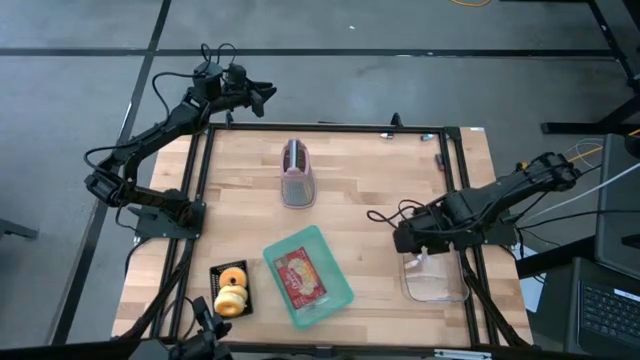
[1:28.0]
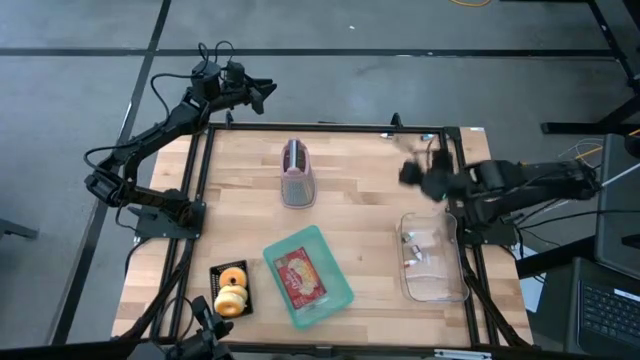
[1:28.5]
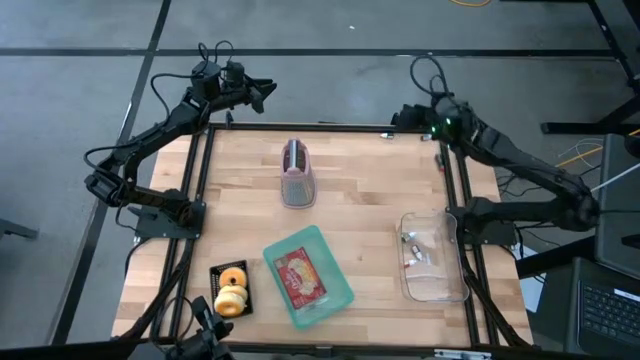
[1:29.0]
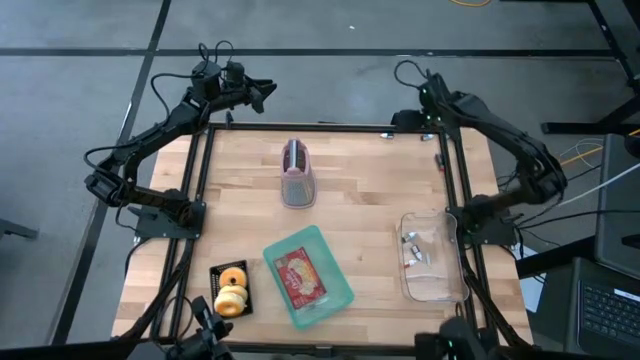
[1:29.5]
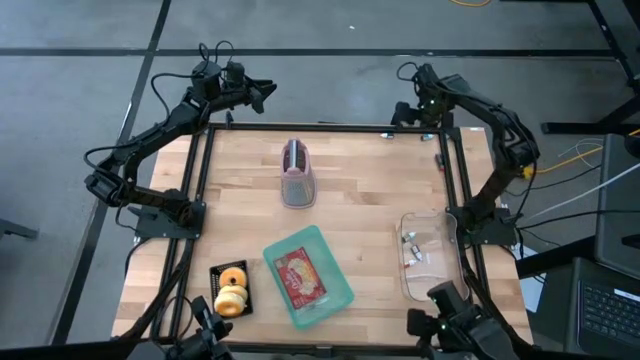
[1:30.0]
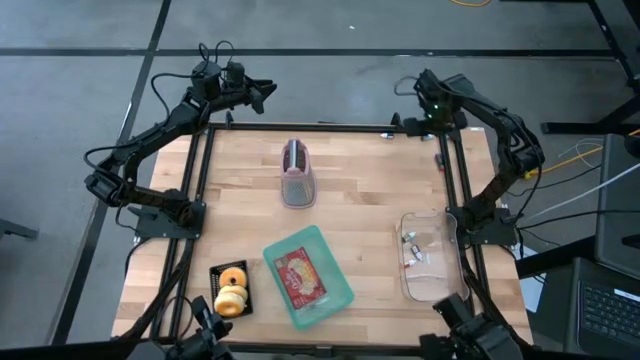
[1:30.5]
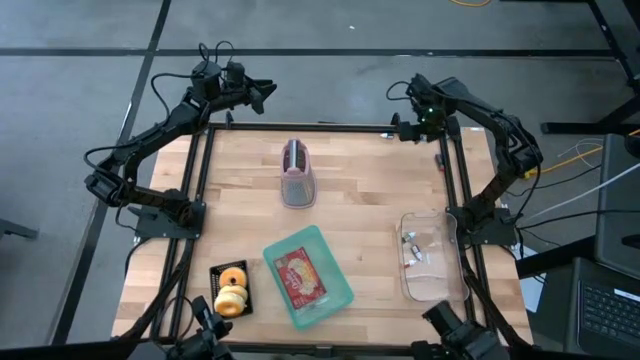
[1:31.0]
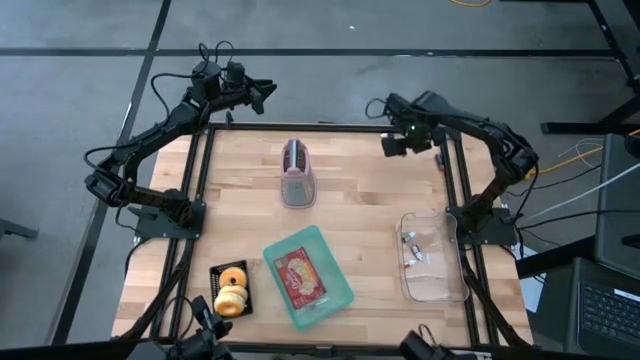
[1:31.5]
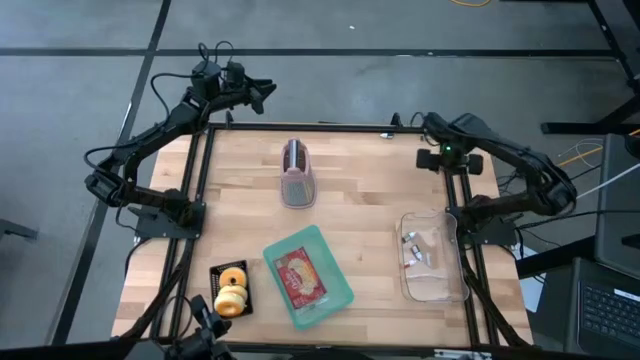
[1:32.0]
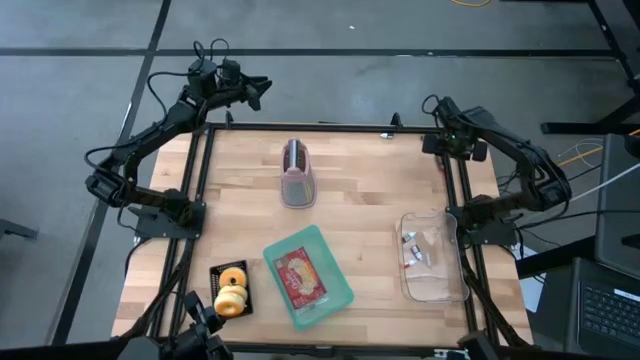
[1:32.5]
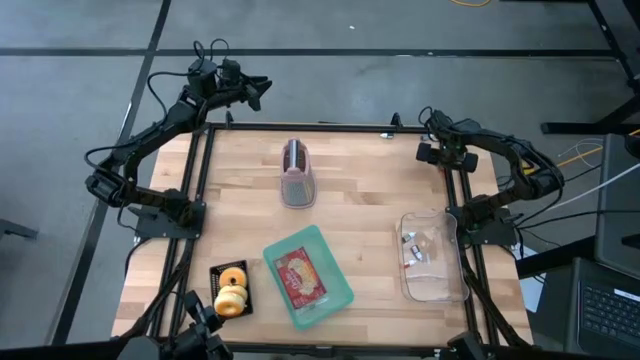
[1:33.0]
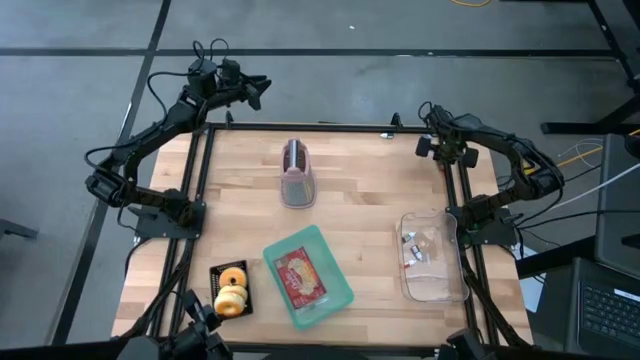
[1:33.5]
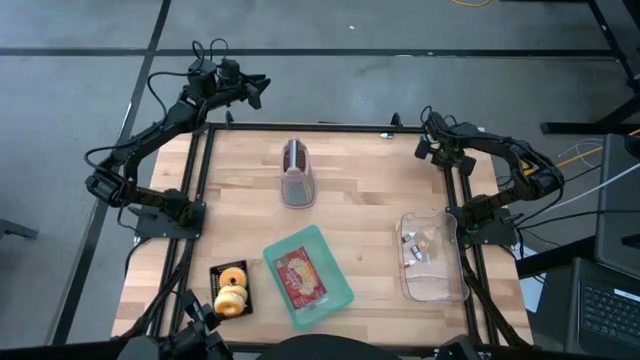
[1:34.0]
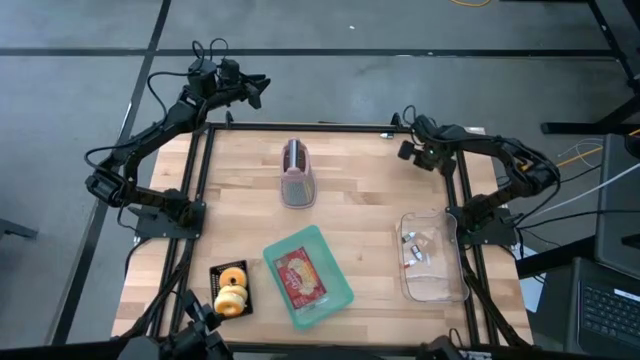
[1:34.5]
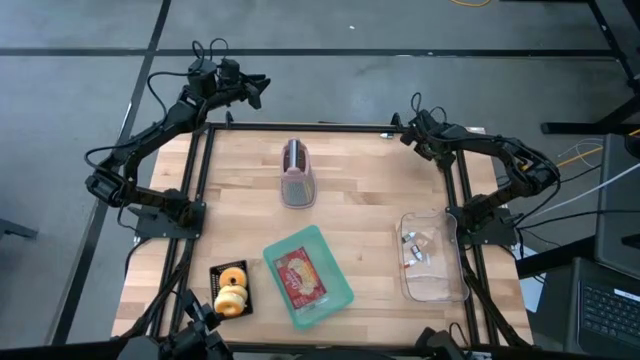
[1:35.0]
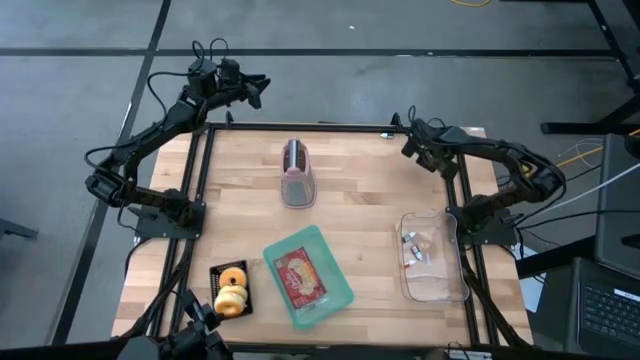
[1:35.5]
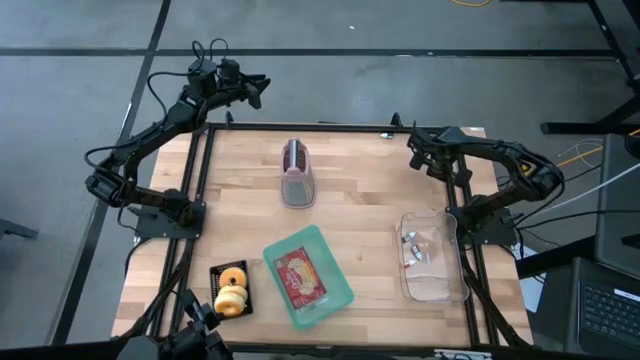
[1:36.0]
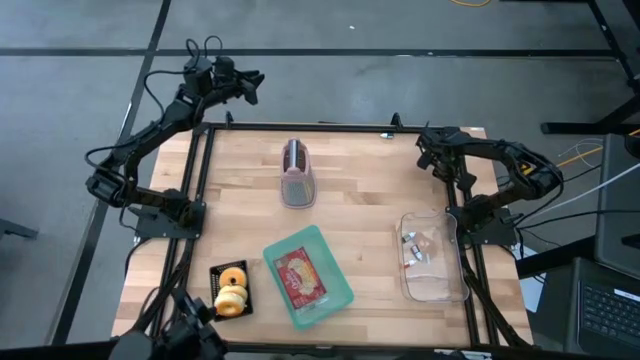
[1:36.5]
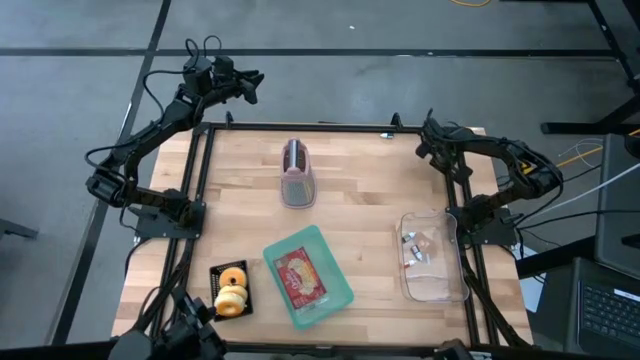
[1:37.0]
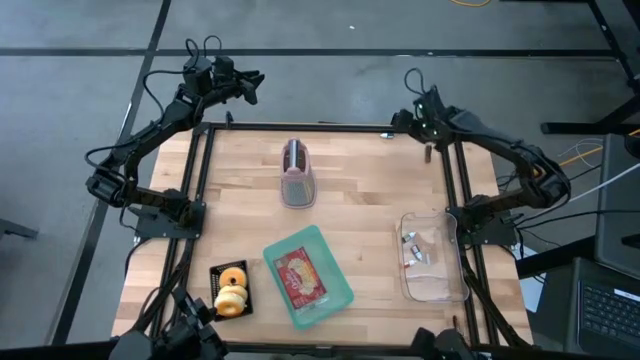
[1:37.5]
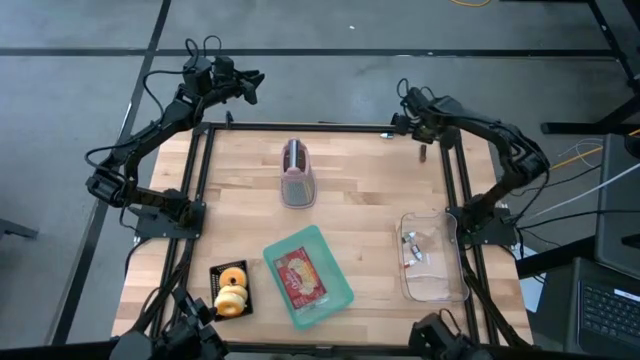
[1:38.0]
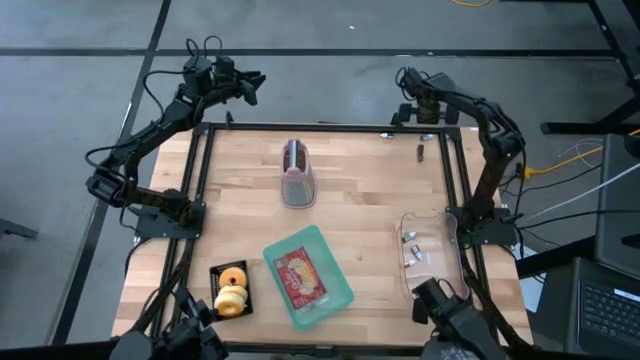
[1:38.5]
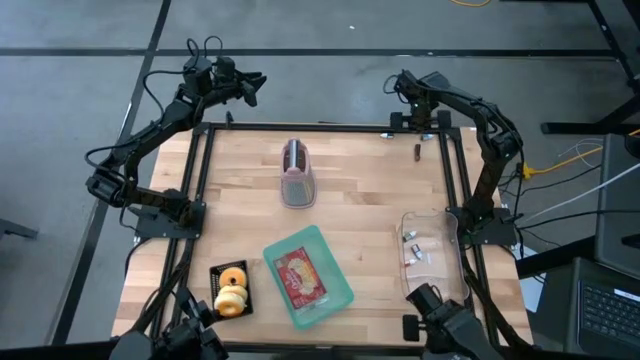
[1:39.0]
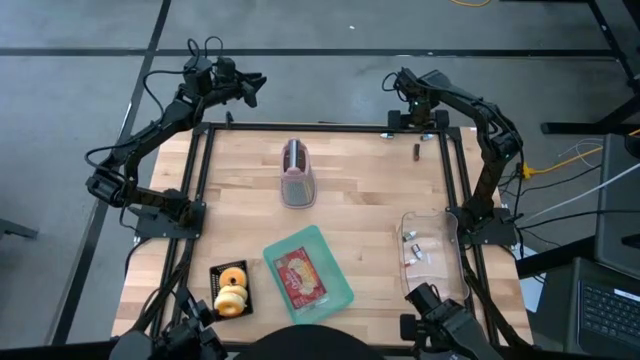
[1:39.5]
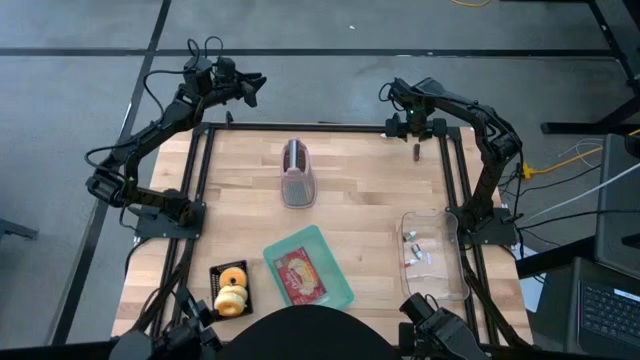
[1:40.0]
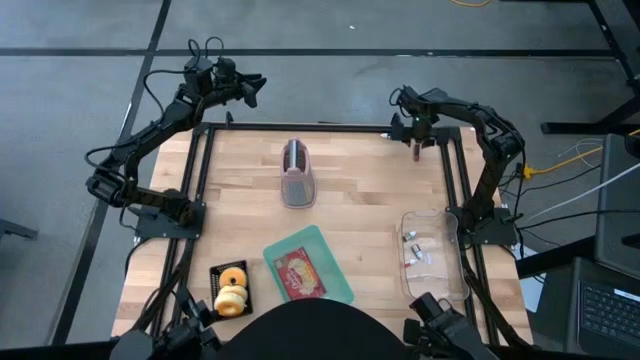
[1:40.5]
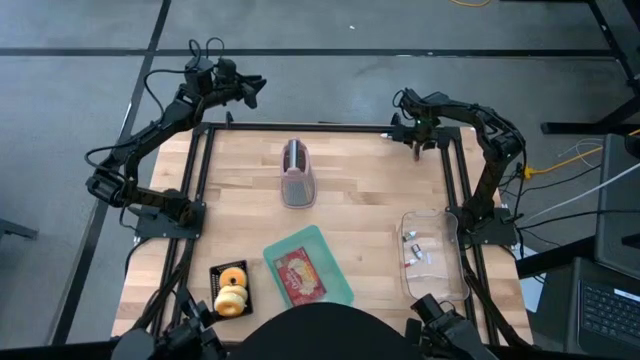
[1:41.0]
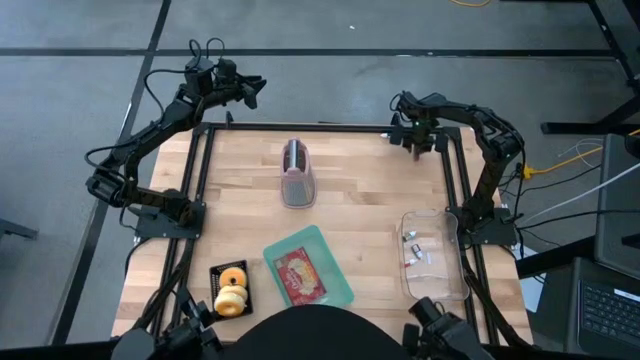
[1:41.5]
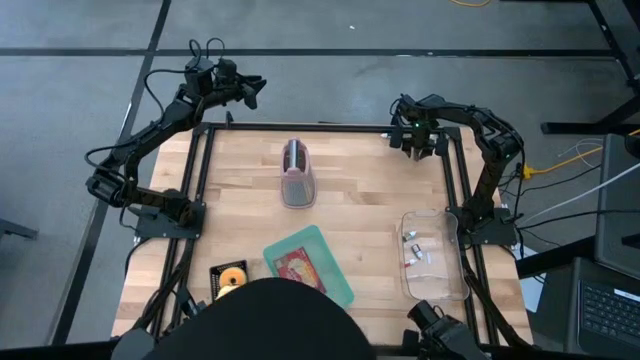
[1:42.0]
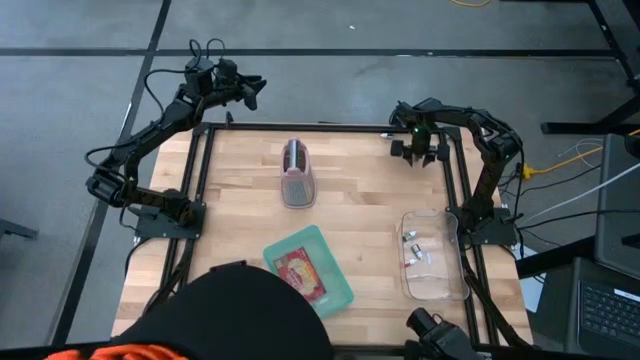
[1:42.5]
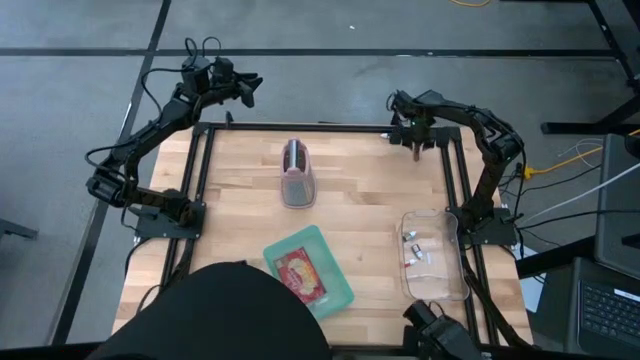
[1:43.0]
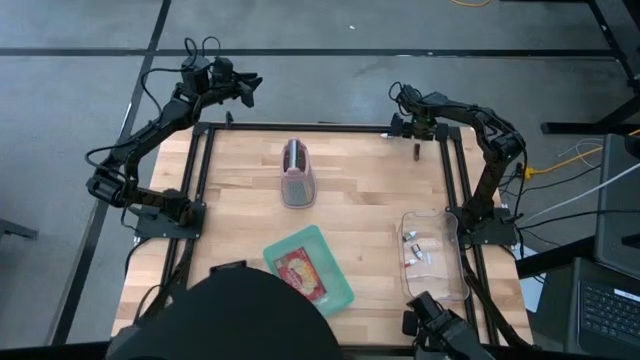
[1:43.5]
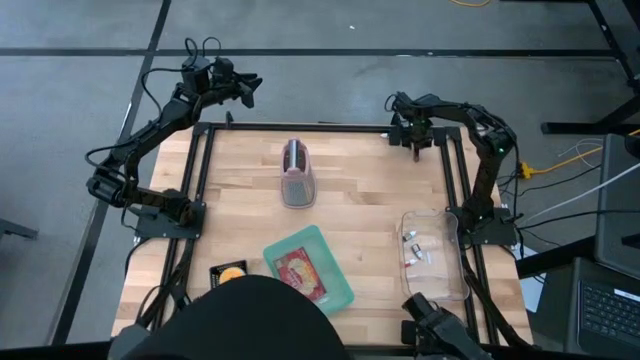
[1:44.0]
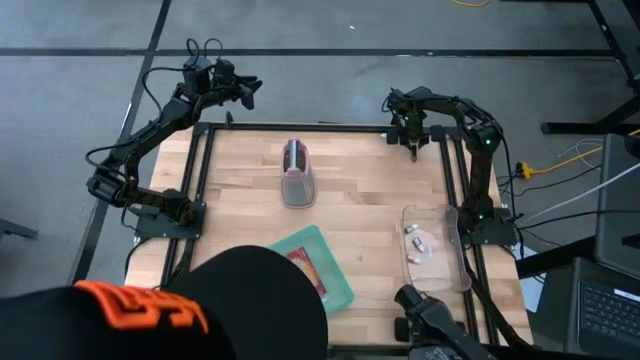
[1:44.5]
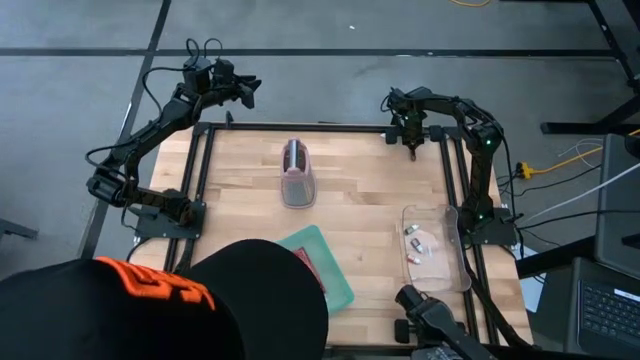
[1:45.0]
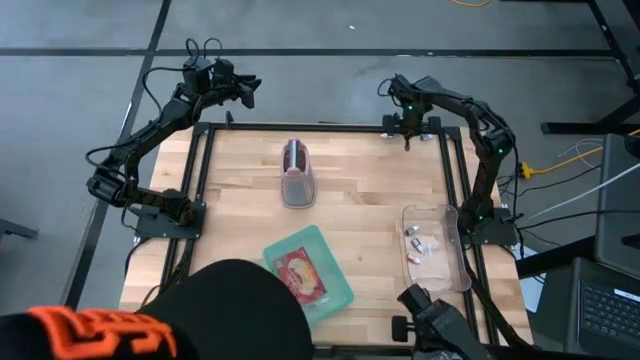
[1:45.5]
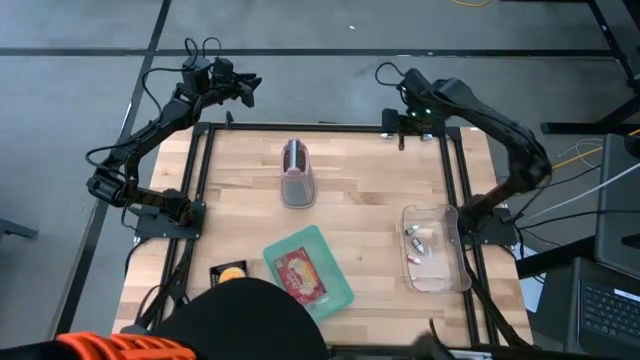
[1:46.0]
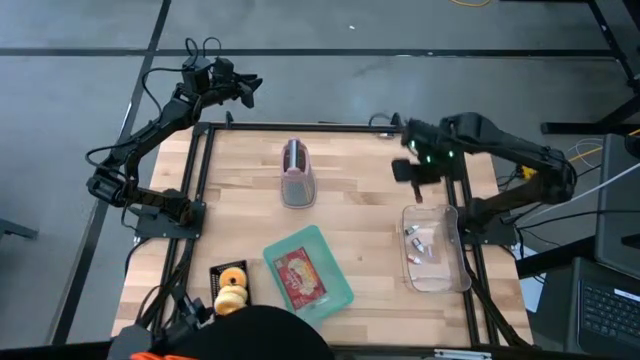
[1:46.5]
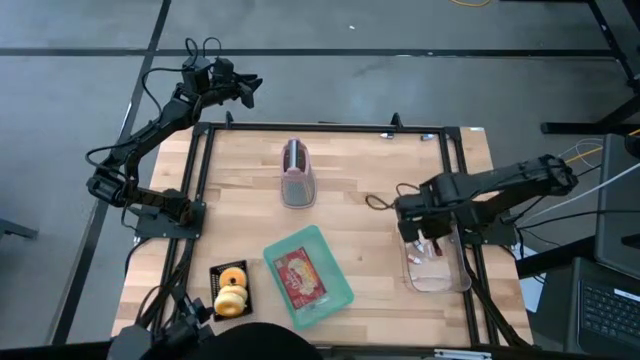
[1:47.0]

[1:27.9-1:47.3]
Task: Pick & Place Food Item
Put the dark red food coloring bottle into the transparent bin

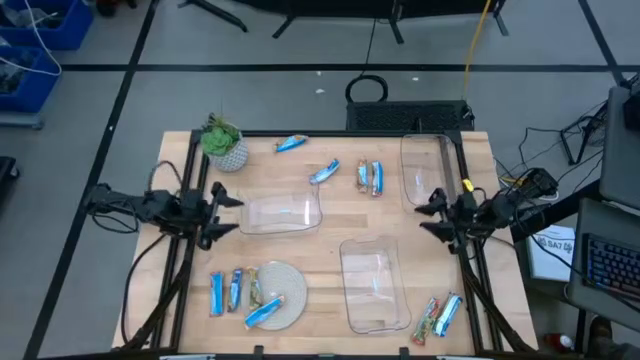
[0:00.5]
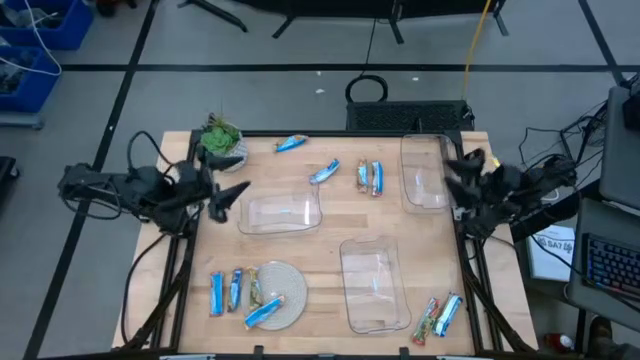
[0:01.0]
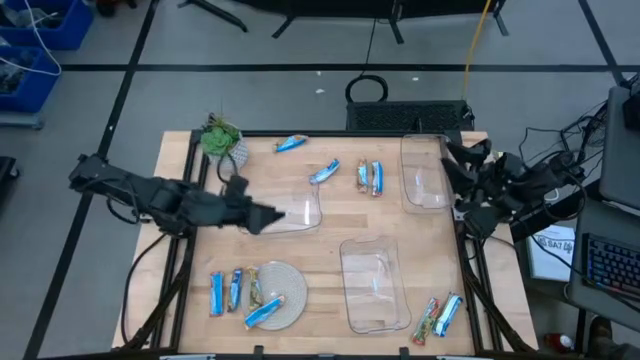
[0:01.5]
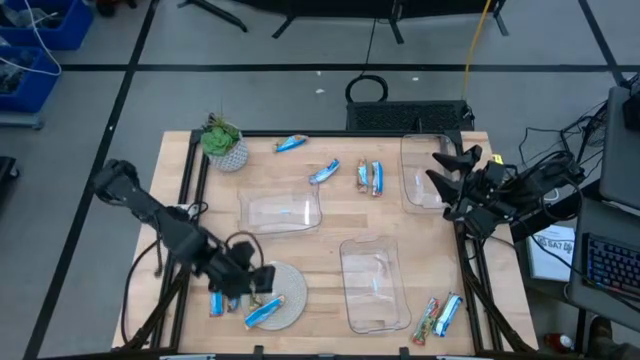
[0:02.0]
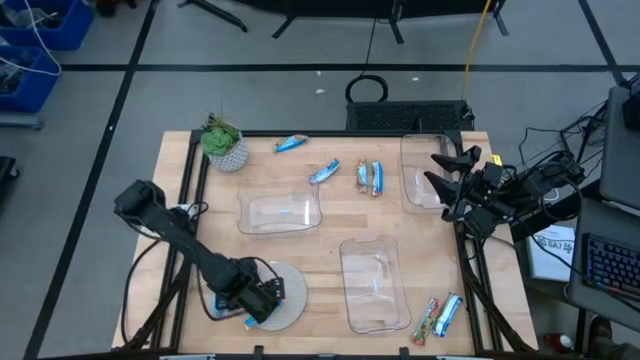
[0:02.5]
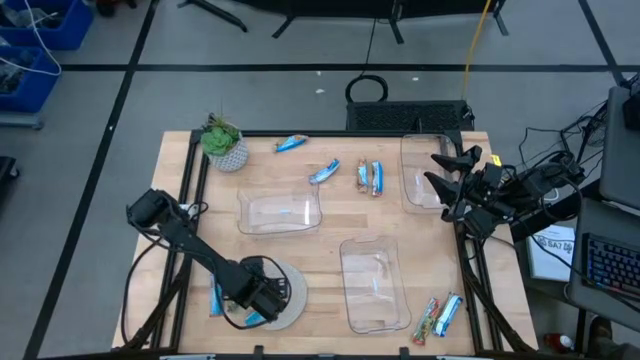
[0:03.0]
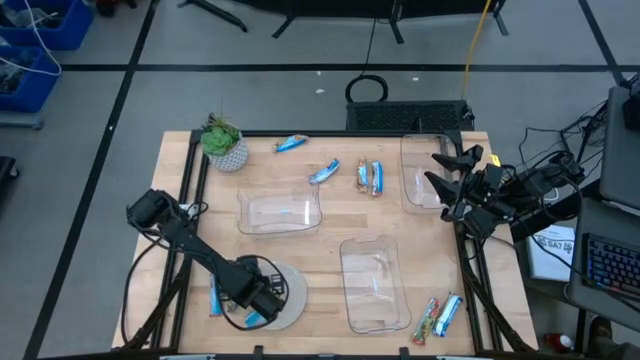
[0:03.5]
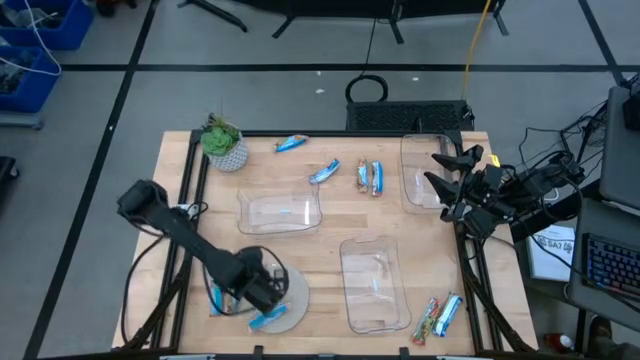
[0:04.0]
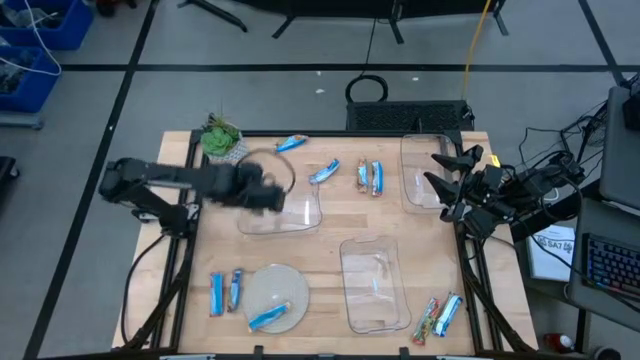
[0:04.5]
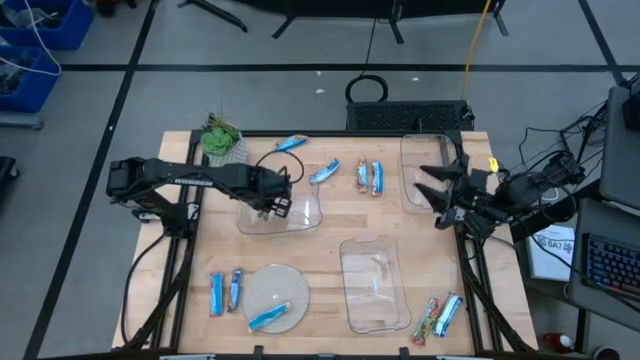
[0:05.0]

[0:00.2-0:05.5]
Task: Pick and place Granola Bars by type
Put the yellow granola bar into the top left transparent bin
